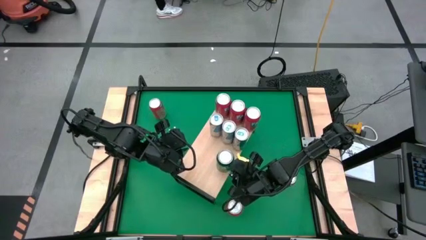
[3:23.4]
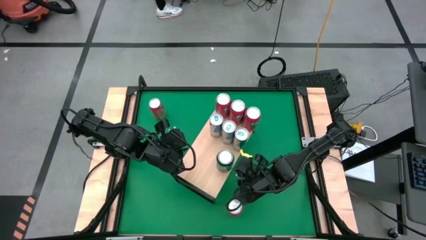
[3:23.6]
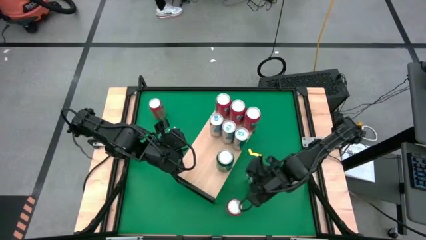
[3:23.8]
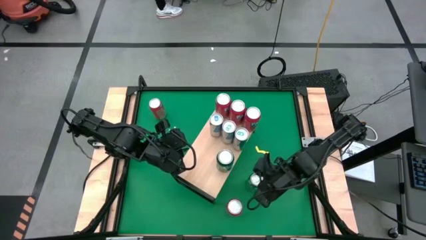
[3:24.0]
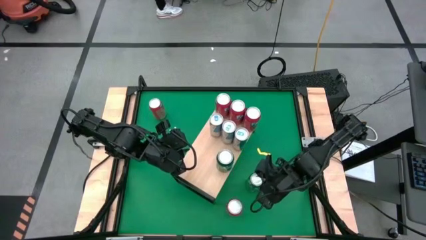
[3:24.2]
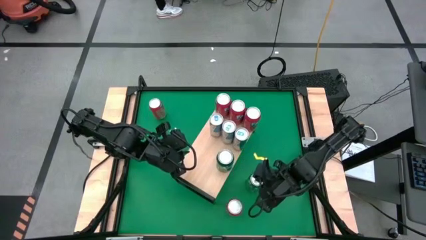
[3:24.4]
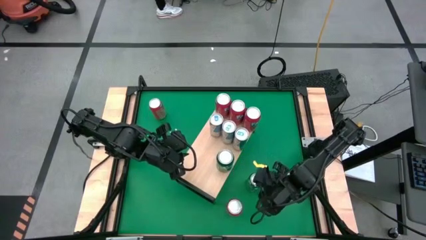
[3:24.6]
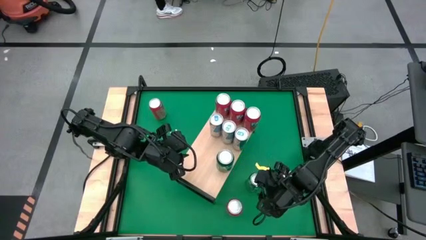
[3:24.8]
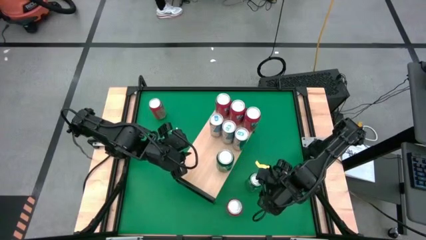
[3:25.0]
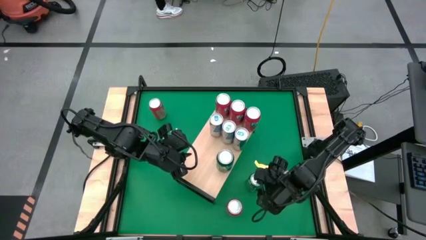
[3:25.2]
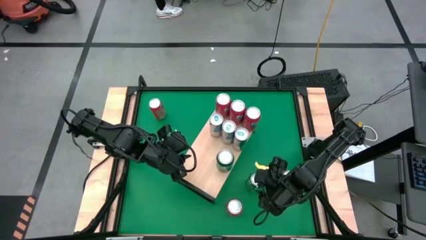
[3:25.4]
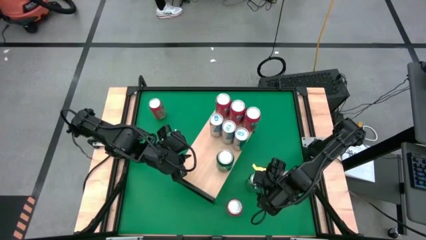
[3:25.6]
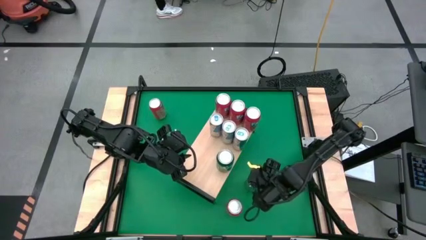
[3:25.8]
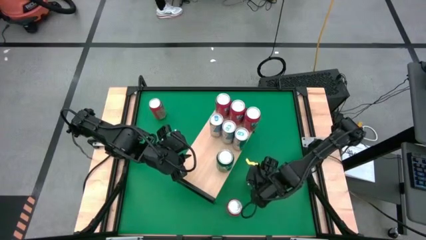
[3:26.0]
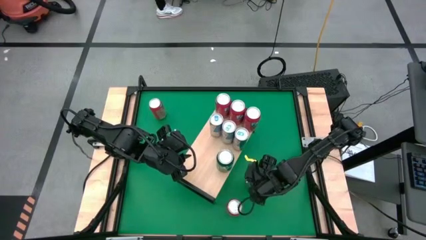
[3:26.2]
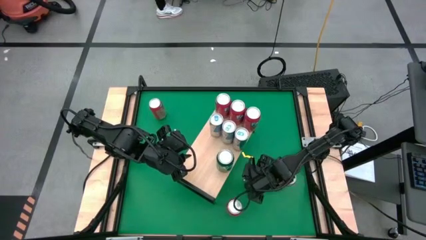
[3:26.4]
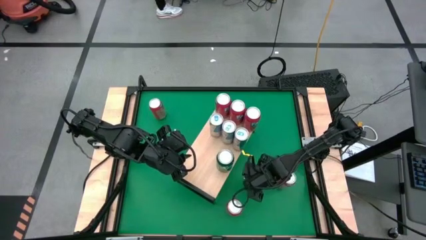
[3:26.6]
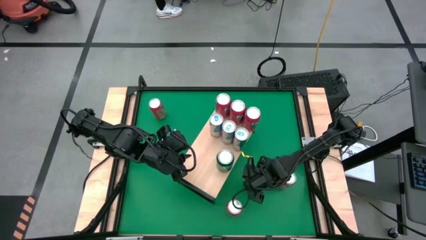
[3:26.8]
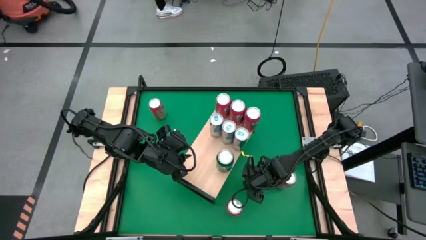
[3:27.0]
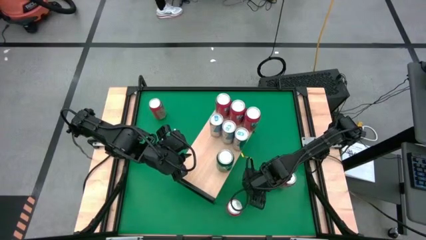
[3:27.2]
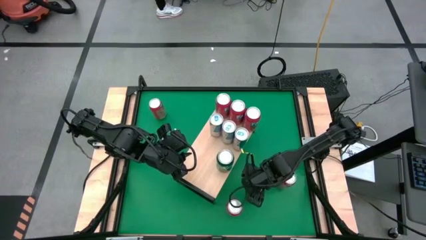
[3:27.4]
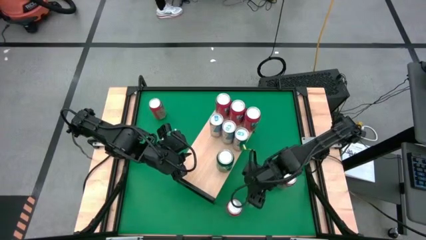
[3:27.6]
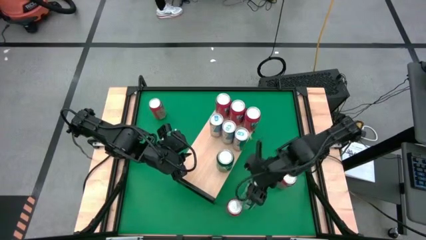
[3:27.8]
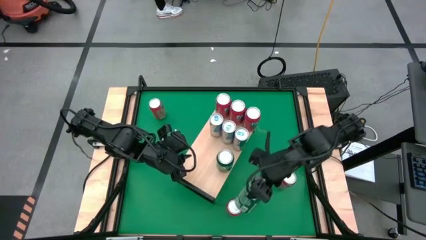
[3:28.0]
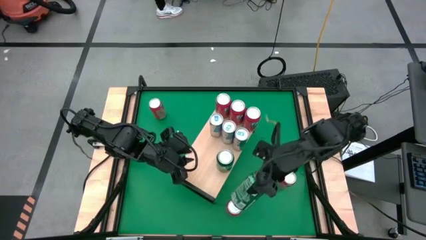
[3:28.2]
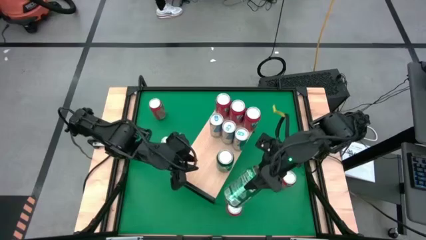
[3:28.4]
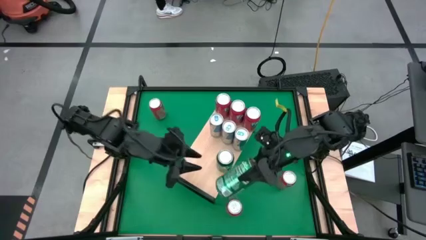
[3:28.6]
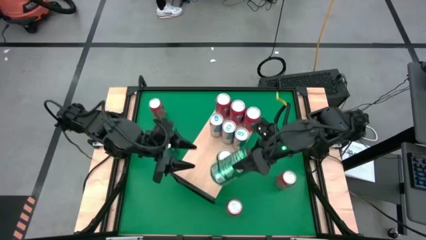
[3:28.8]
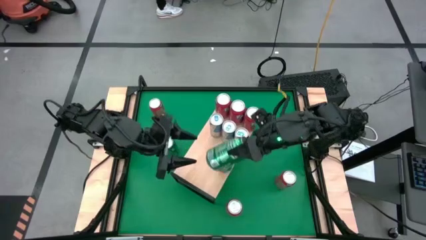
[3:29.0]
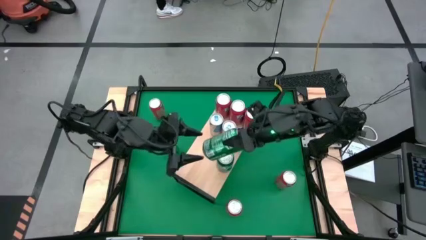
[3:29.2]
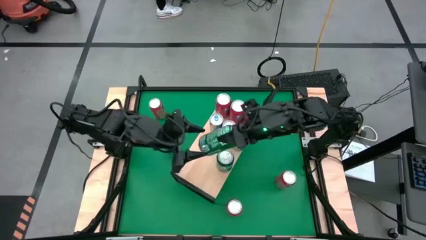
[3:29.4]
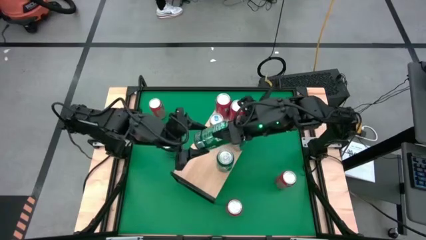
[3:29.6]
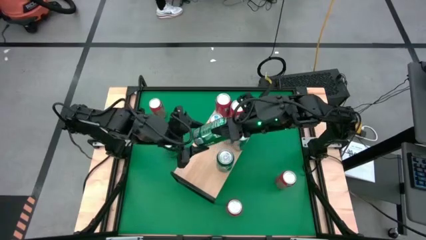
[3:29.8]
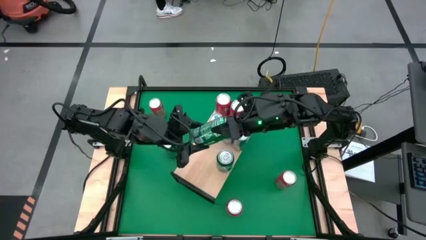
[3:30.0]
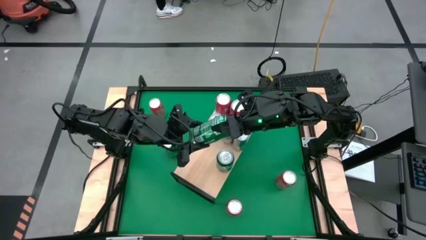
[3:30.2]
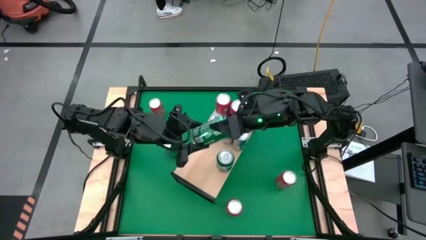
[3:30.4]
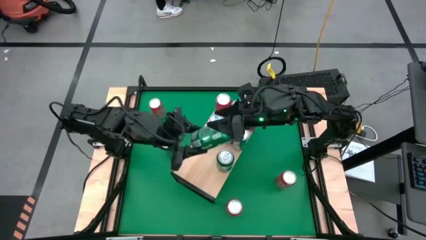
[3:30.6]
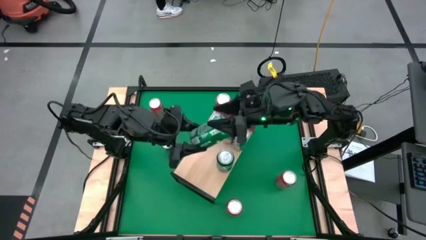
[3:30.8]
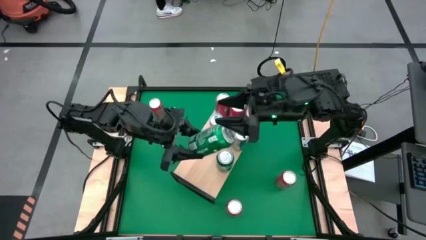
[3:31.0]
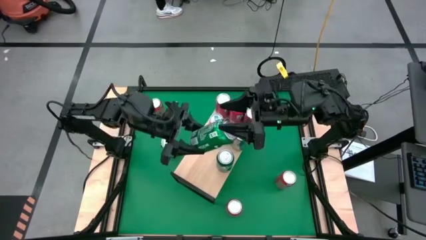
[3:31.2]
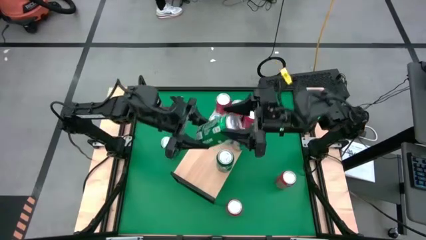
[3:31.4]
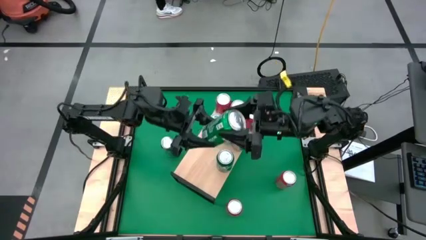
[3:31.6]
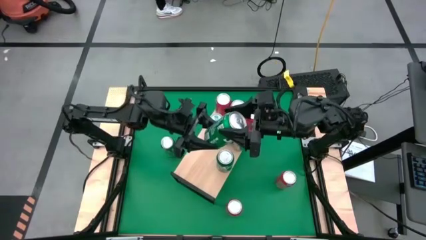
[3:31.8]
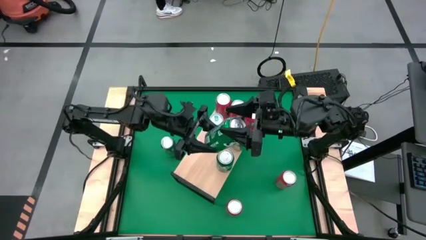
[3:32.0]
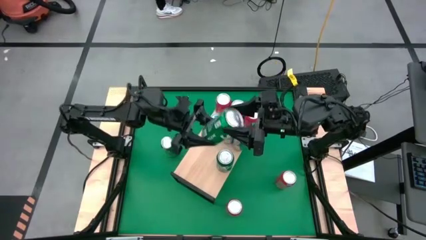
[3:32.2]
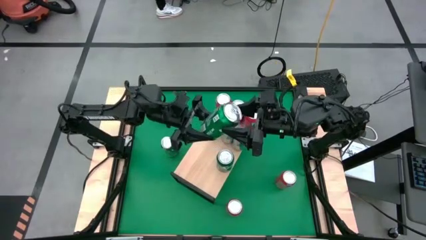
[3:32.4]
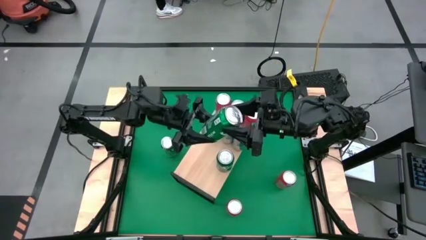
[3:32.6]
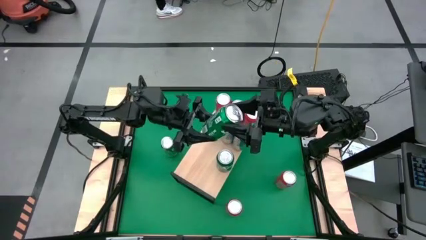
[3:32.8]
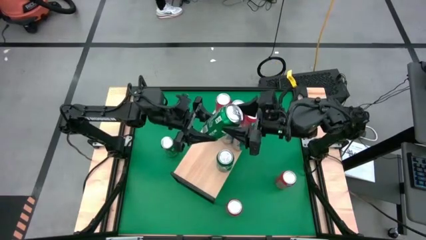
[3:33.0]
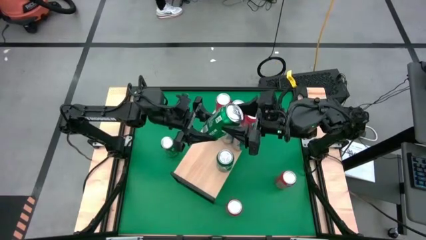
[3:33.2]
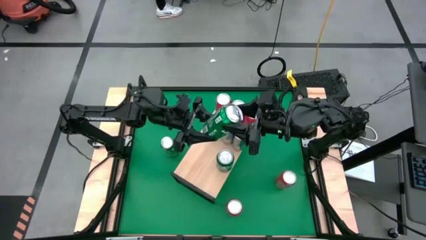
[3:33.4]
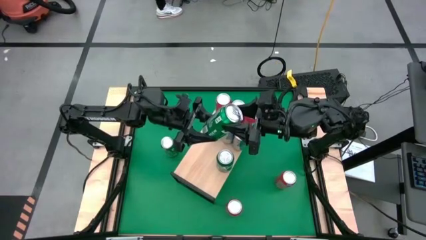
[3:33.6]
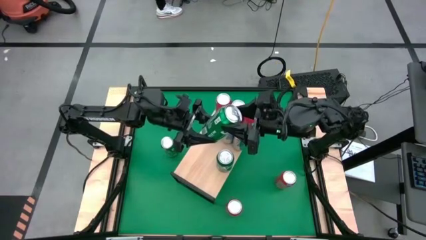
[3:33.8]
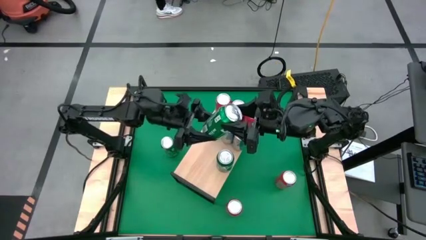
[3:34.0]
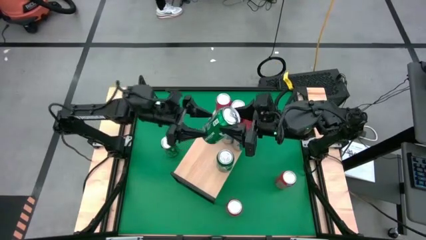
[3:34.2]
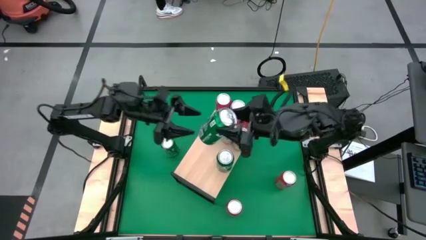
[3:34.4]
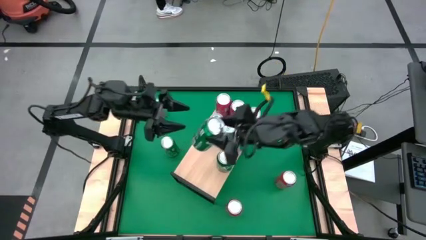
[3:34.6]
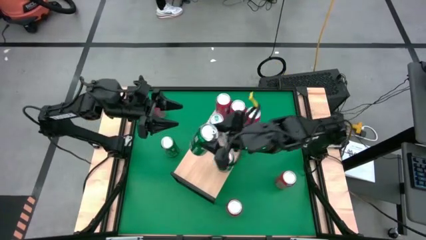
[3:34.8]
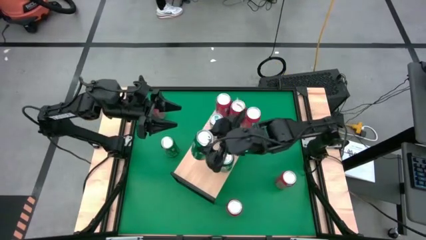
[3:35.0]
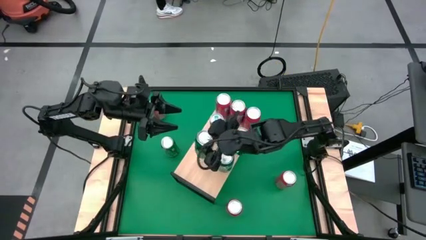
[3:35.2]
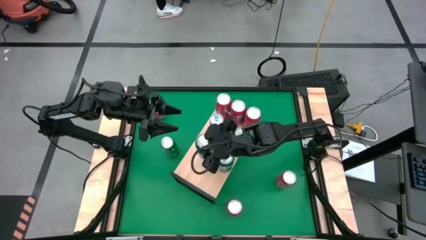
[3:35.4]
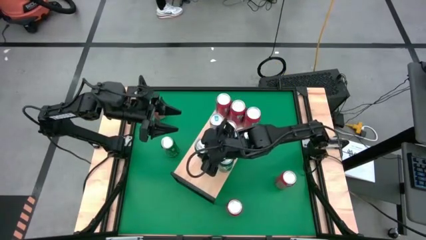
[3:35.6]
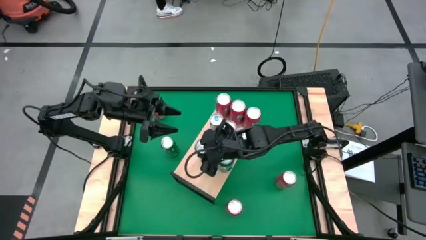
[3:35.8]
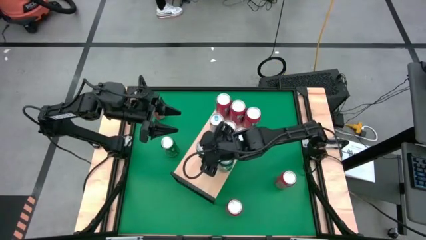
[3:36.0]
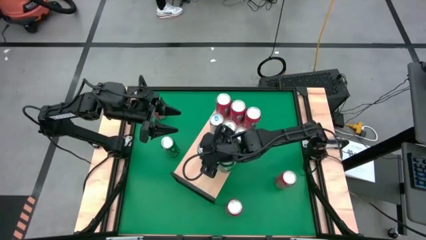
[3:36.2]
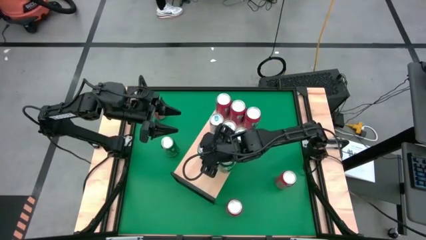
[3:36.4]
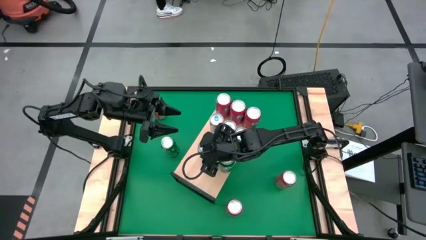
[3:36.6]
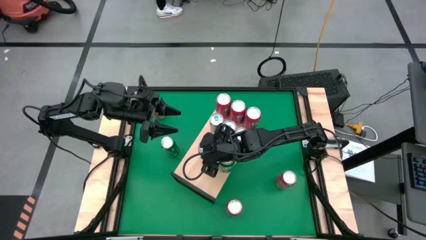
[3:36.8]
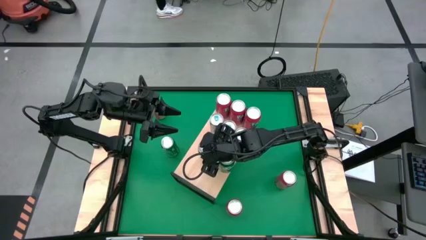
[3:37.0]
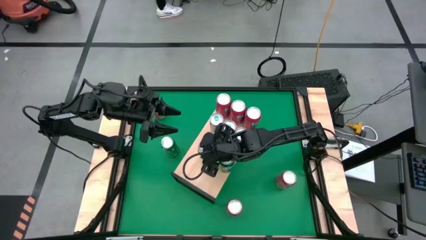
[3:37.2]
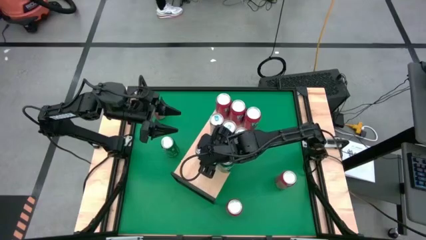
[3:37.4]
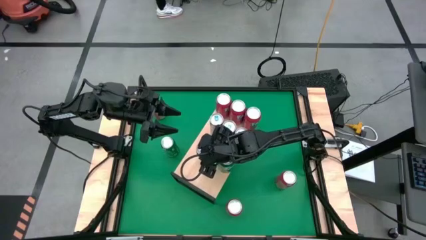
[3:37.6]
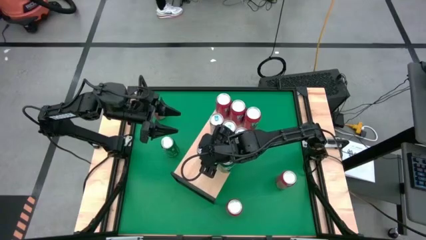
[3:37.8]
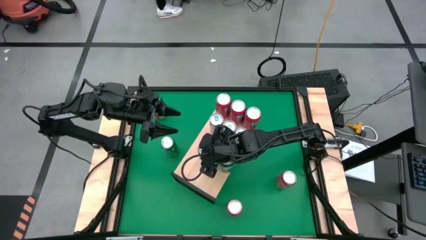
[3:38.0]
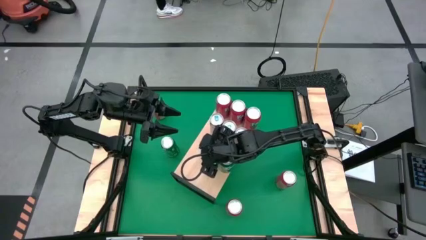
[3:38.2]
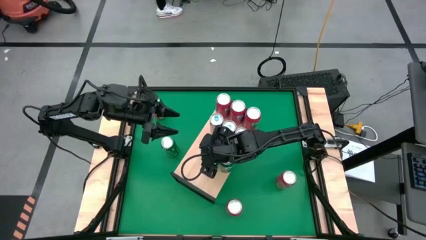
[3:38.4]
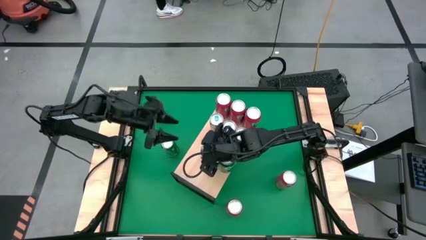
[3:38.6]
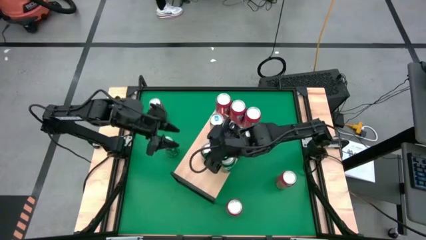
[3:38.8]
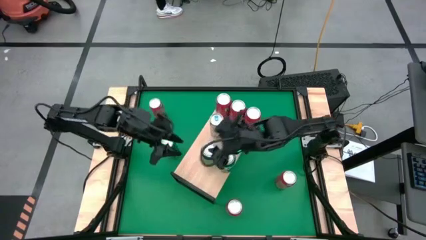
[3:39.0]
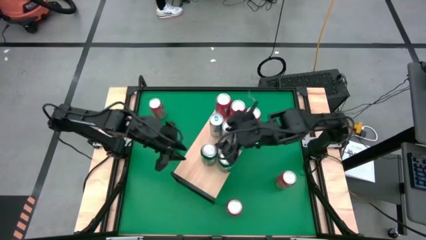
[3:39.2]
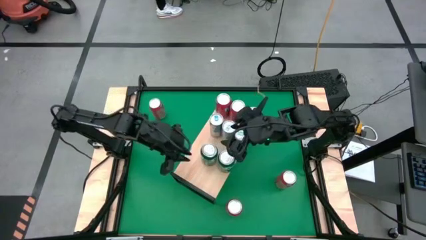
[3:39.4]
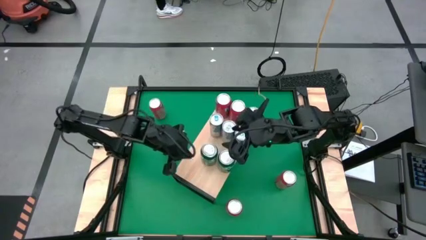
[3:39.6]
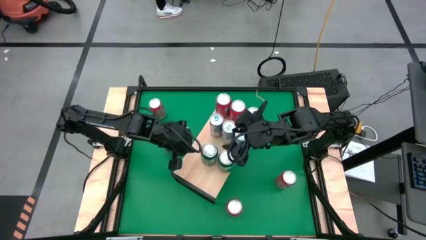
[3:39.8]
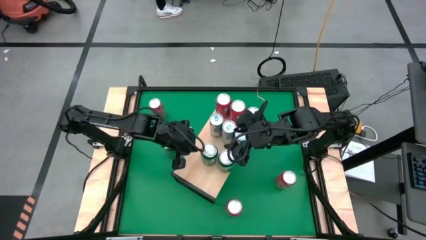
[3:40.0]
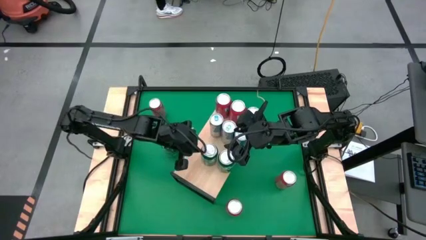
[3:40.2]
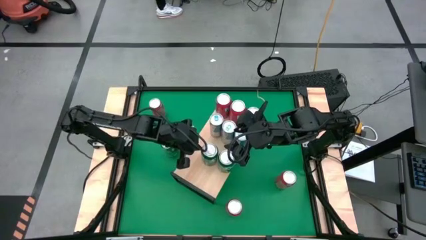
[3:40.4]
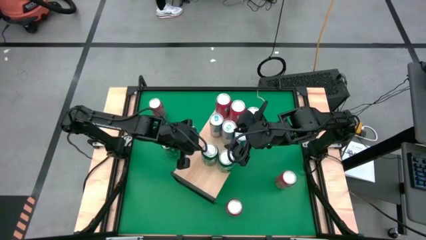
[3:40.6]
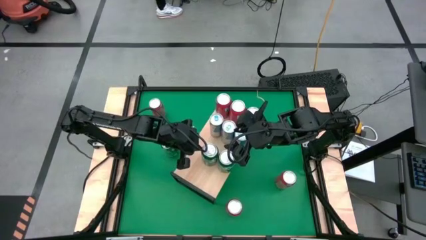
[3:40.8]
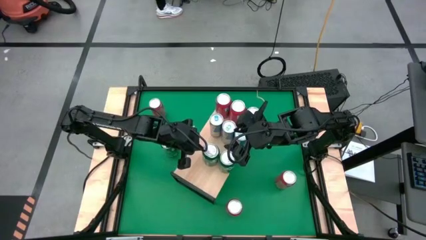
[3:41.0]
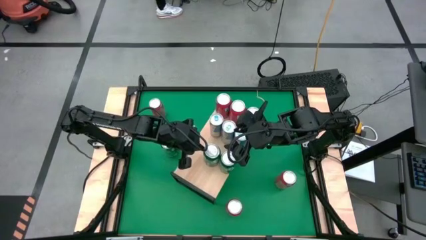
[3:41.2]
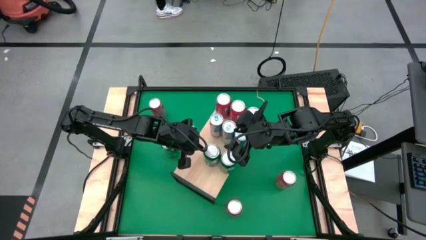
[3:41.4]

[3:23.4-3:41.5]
Task: Sort soda cans
Put the green soda can on the shelf and align it with the other green soda can
